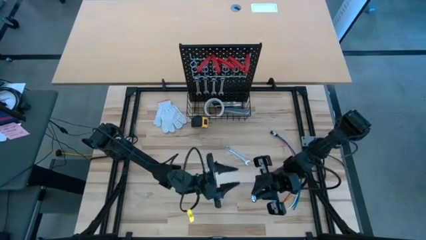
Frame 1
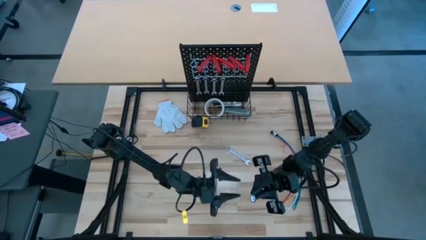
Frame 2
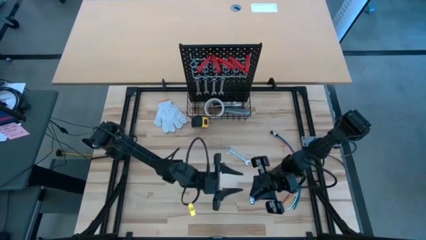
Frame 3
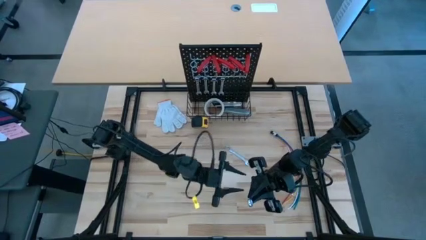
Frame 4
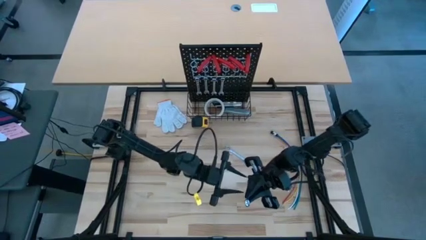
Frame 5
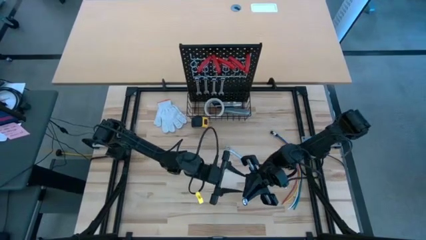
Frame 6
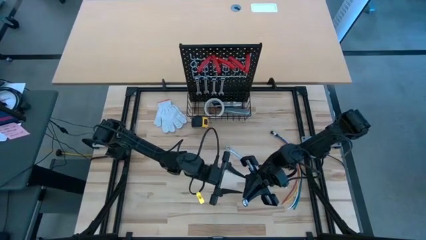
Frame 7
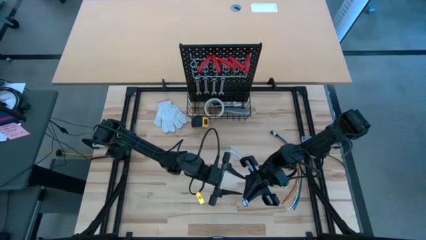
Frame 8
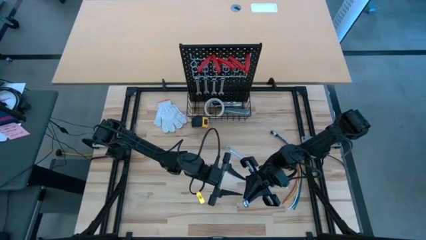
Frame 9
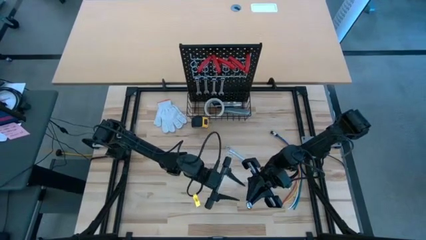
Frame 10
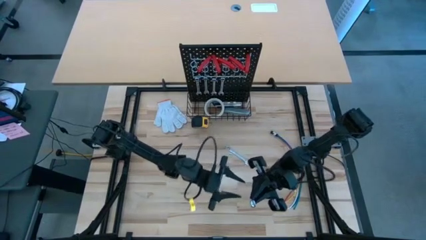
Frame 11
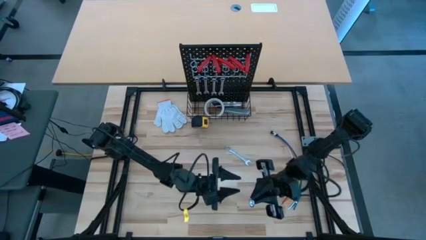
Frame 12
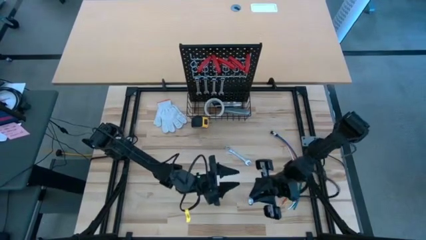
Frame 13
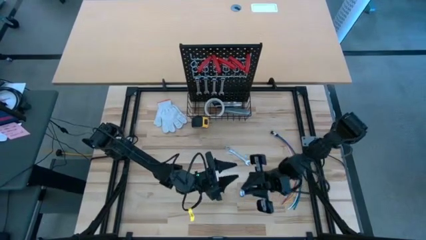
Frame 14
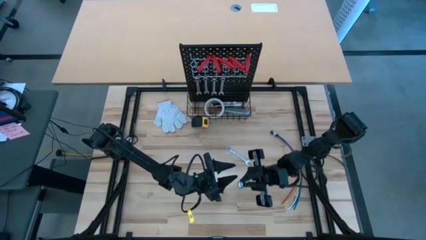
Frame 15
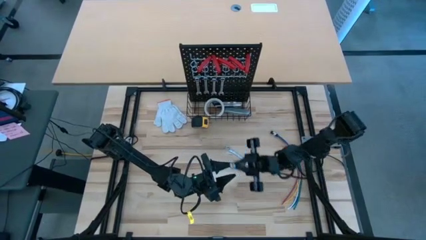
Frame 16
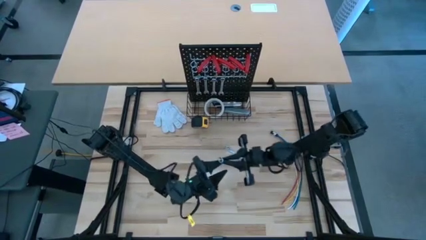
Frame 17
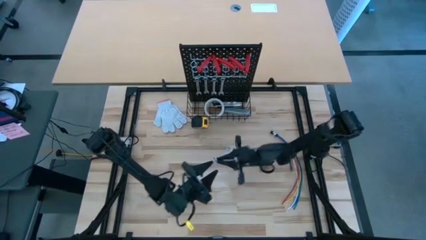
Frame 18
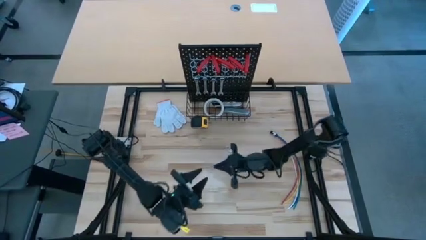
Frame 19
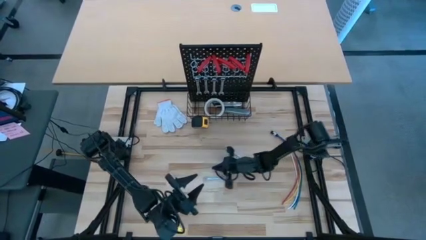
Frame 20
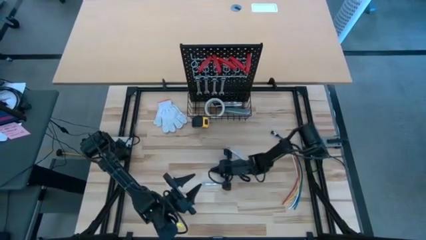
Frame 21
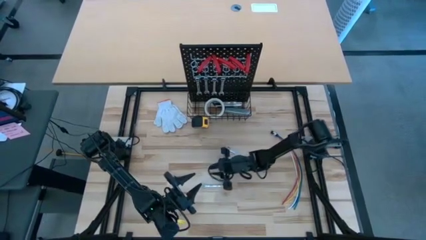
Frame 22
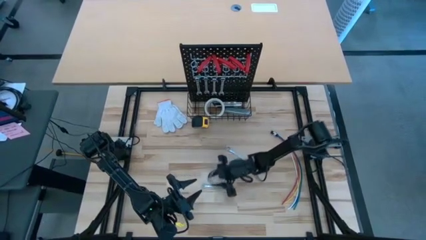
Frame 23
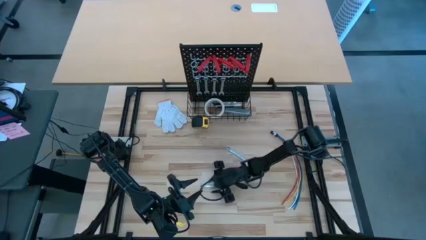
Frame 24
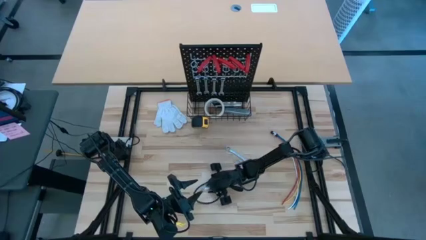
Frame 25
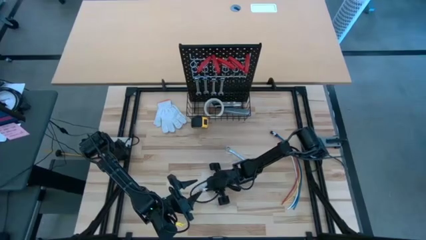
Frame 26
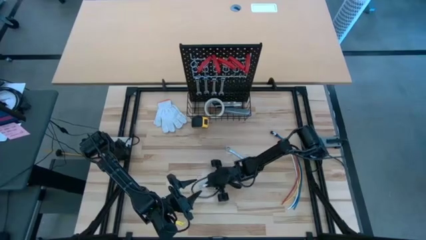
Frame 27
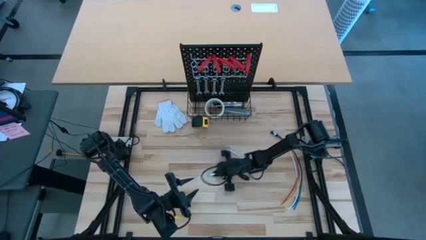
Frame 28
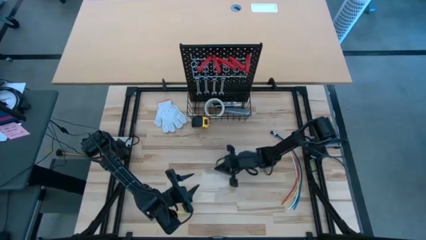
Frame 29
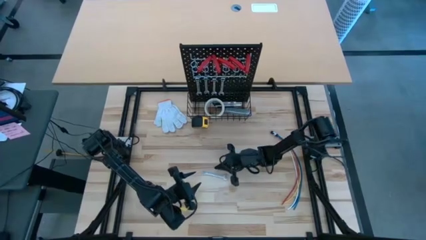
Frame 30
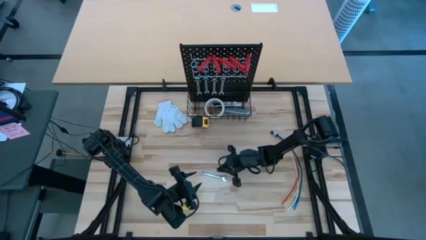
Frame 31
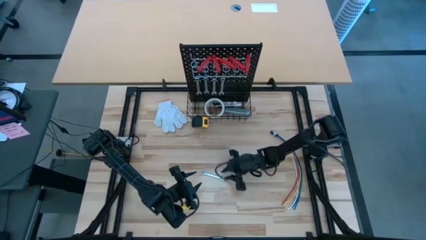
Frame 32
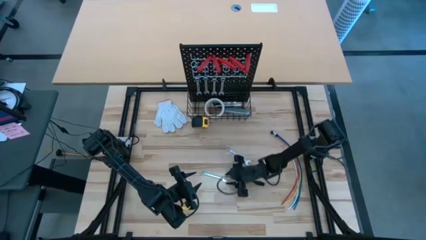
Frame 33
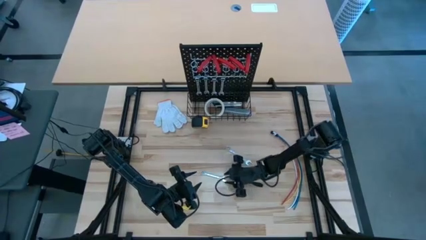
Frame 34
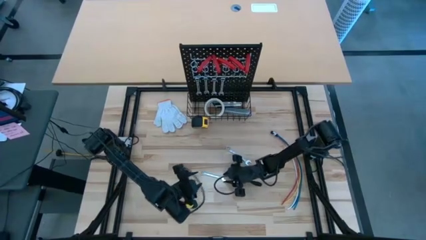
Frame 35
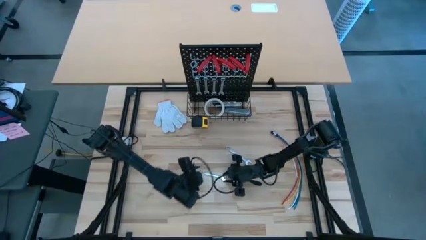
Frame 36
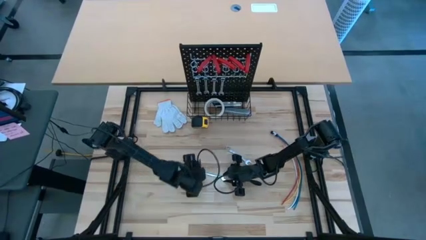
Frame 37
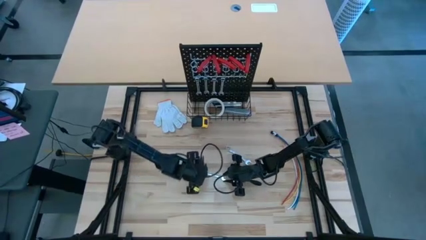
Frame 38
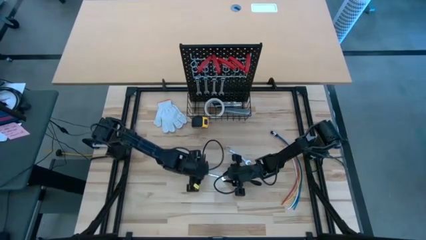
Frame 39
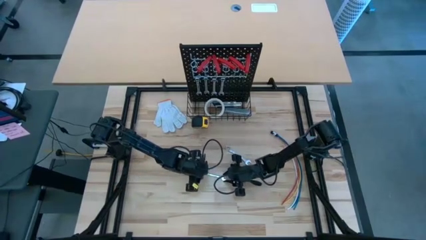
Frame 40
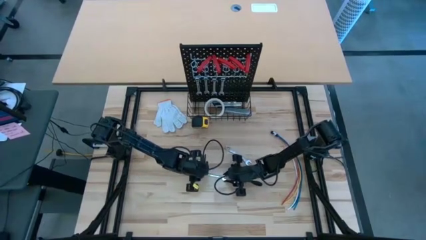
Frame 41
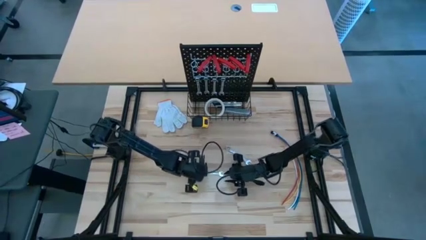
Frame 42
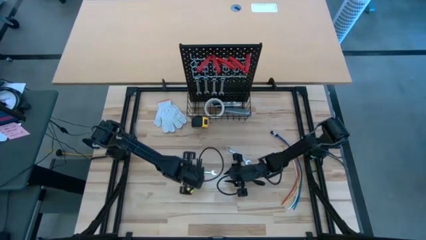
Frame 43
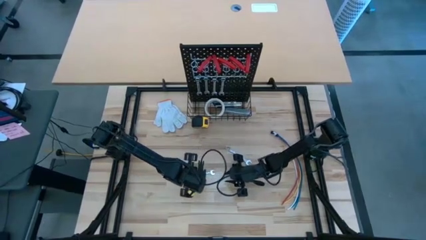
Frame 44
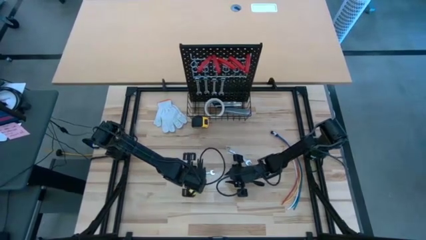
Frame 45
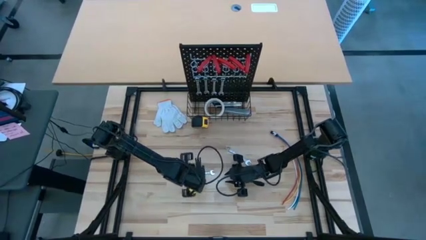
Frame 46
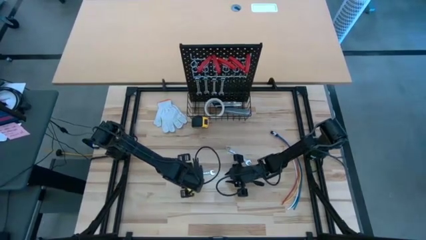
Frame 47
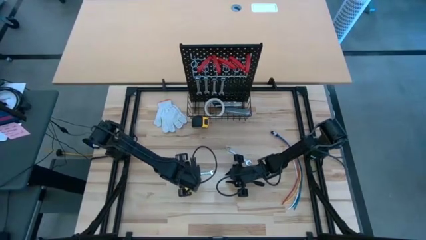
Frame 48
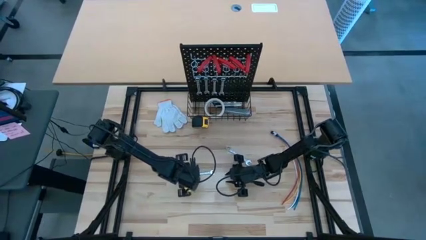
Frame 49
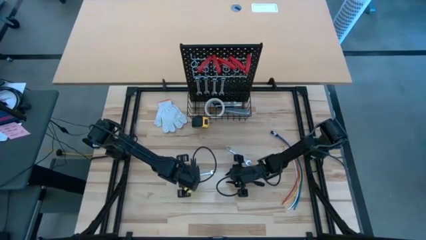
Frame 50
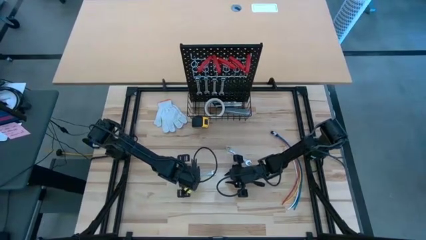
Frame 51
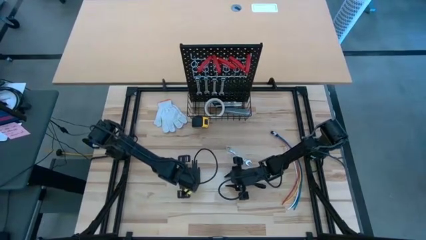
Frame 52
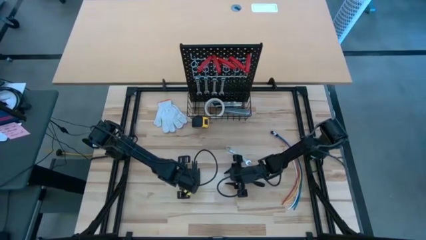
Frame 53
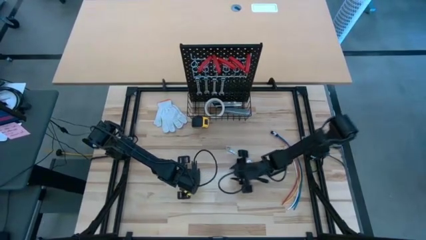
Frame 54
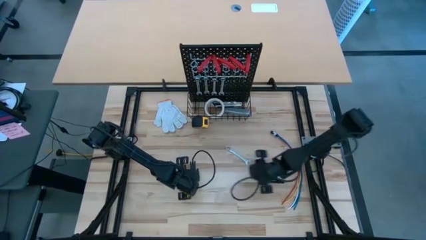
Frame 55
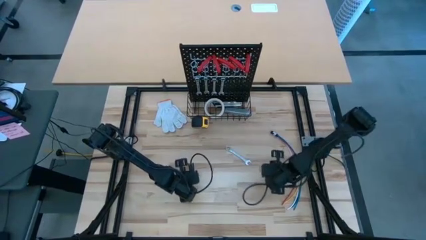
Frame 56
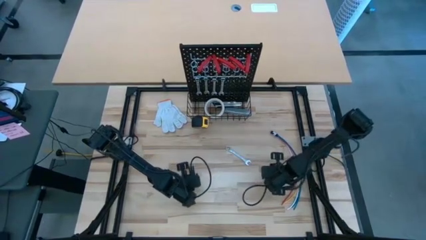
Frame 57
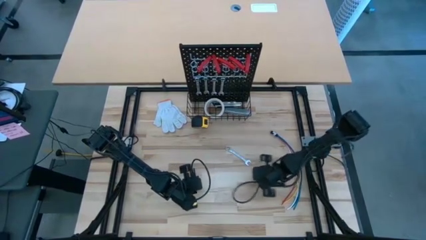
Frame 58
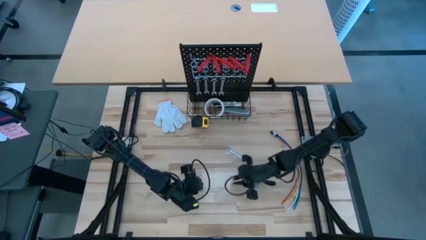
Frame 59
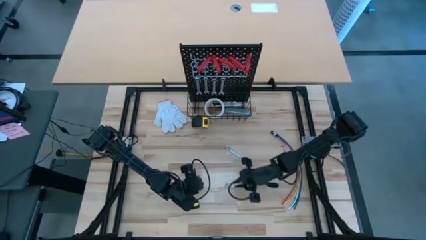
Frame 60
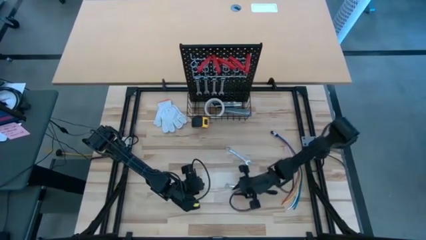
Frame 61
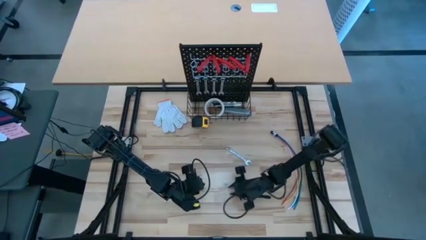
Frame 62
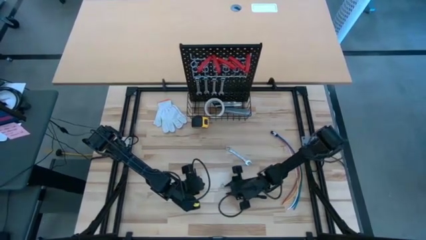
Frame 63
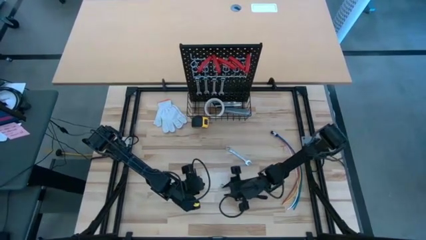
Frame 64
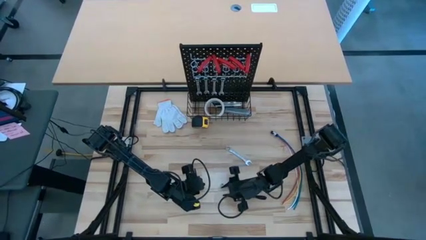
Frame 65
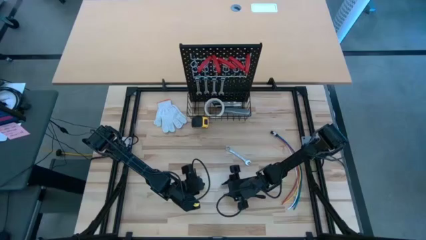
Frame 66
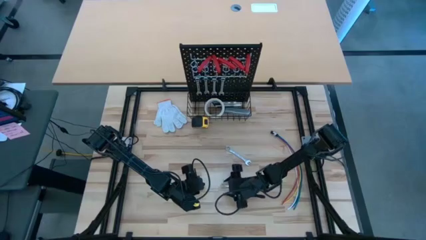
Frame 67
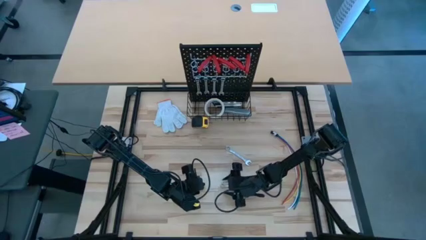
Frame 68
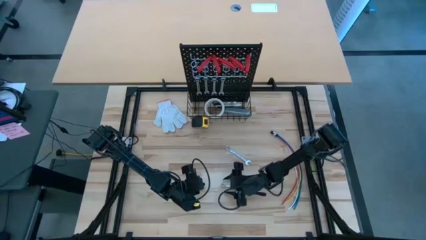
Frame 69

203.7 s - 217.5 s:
Task: Hang tools onto peg board
Hang the silver wrench on the pegboard
